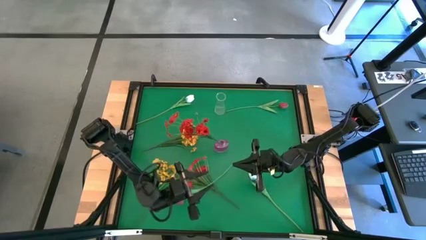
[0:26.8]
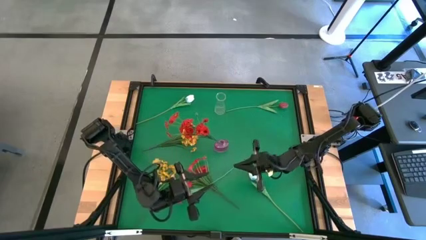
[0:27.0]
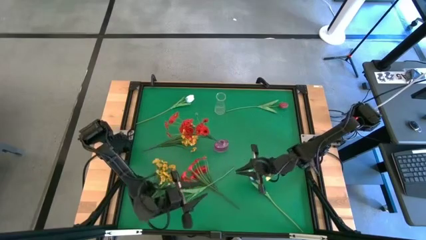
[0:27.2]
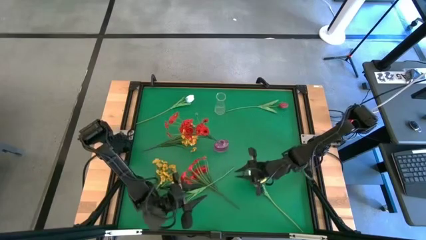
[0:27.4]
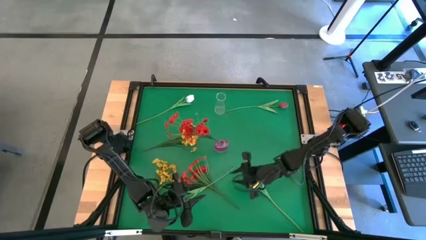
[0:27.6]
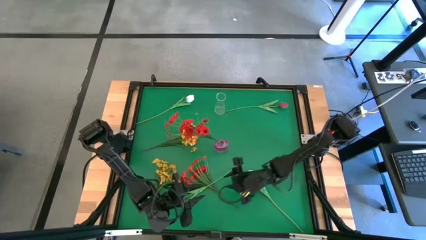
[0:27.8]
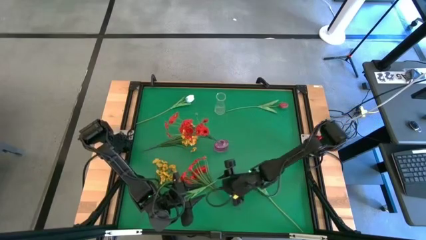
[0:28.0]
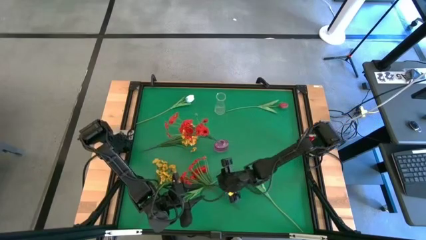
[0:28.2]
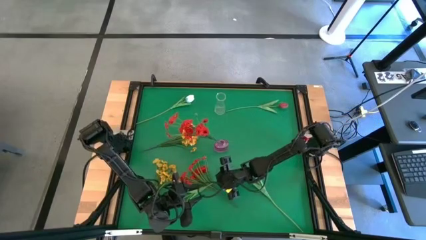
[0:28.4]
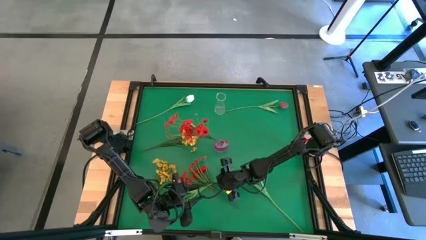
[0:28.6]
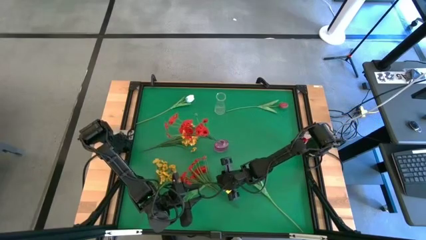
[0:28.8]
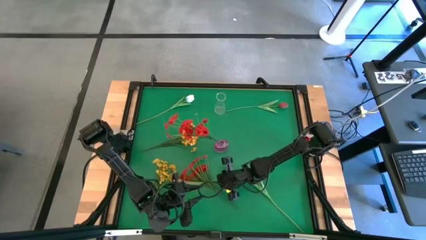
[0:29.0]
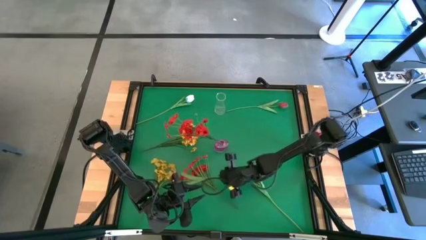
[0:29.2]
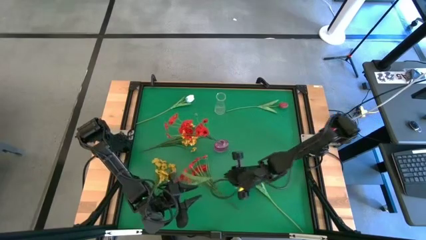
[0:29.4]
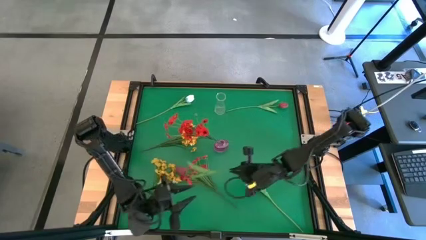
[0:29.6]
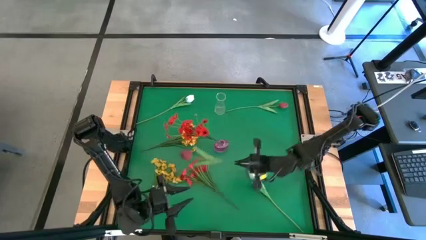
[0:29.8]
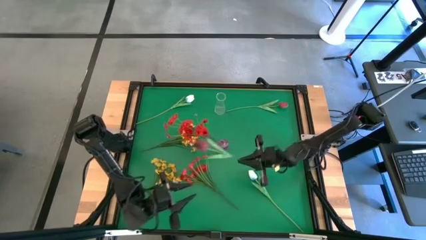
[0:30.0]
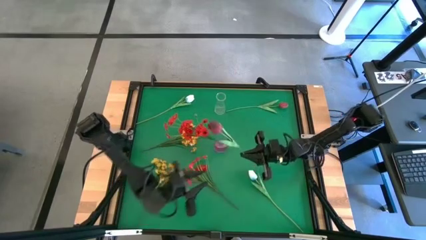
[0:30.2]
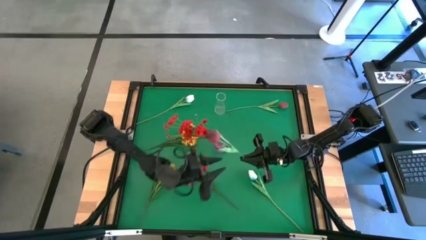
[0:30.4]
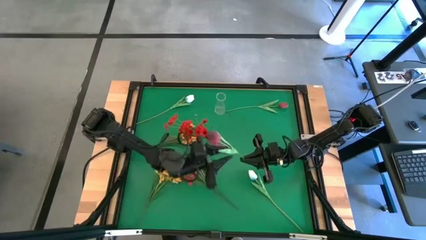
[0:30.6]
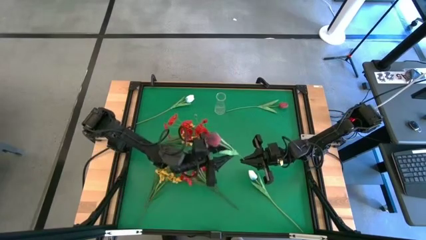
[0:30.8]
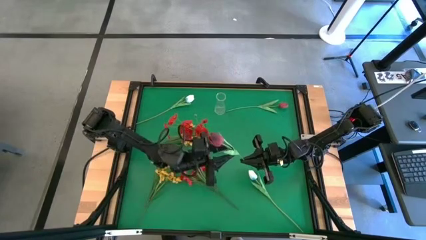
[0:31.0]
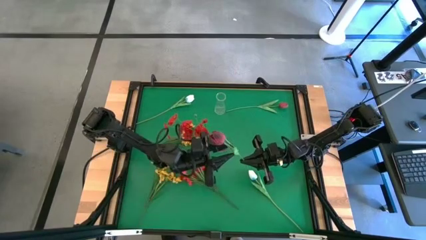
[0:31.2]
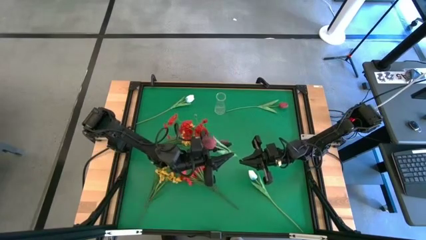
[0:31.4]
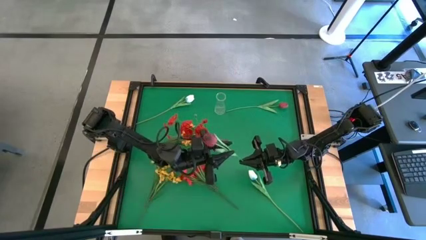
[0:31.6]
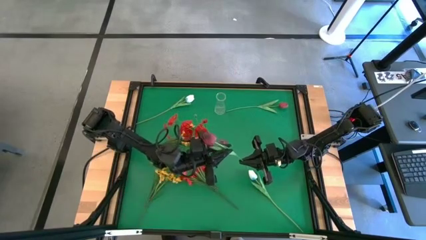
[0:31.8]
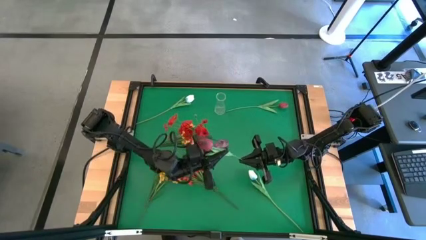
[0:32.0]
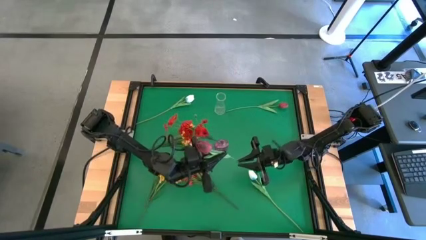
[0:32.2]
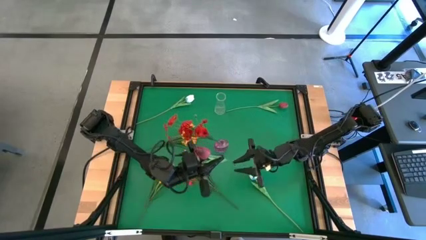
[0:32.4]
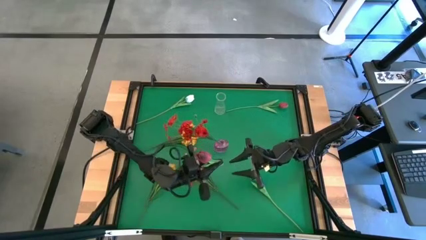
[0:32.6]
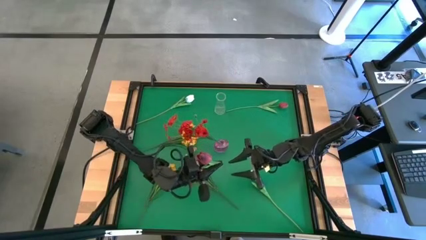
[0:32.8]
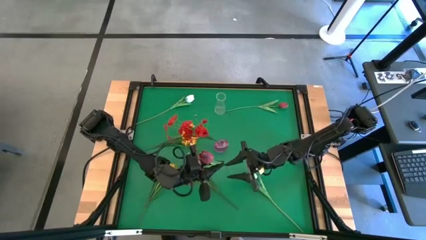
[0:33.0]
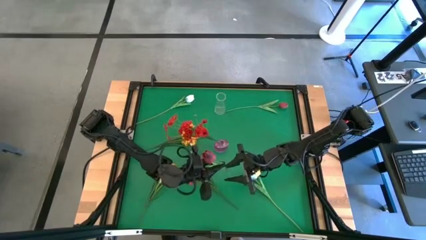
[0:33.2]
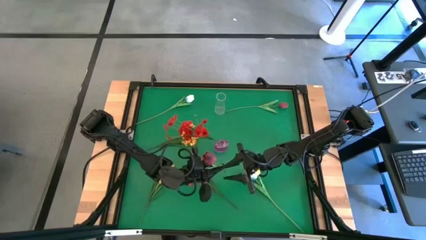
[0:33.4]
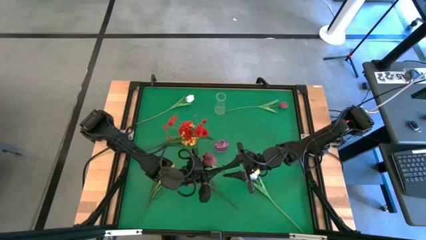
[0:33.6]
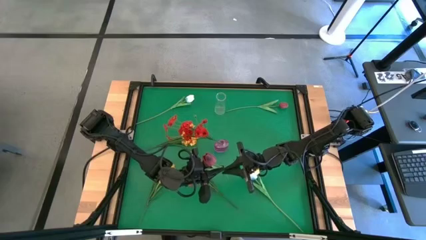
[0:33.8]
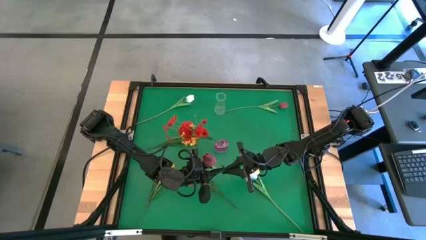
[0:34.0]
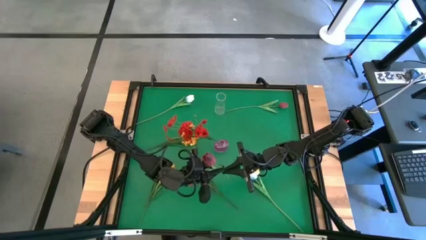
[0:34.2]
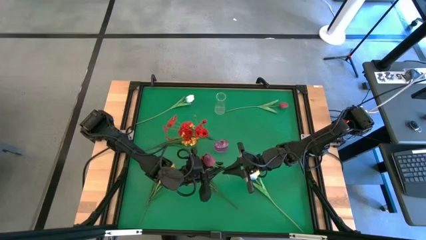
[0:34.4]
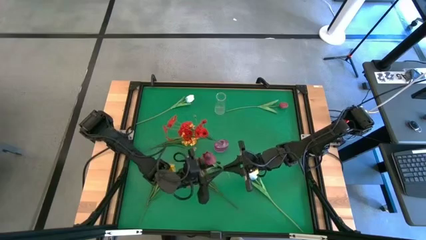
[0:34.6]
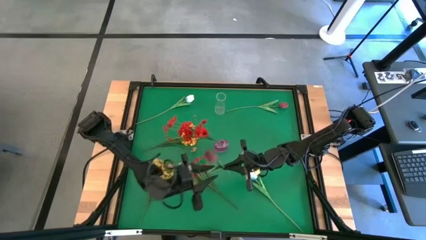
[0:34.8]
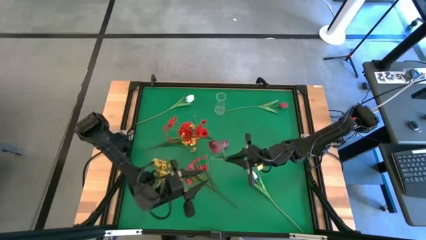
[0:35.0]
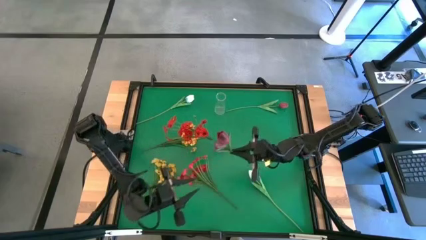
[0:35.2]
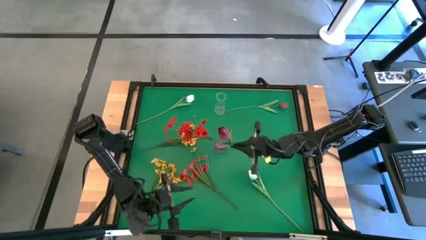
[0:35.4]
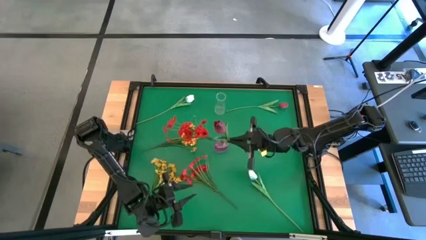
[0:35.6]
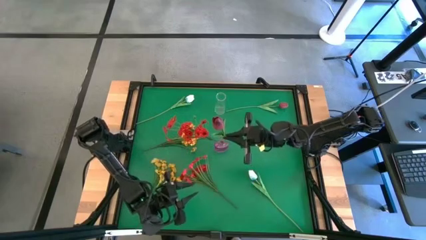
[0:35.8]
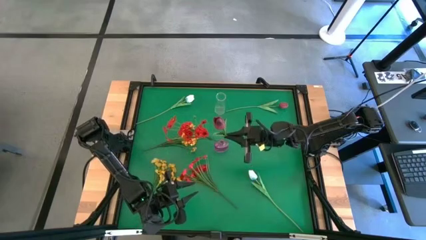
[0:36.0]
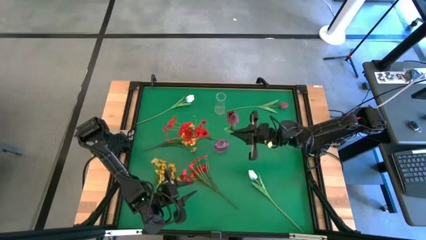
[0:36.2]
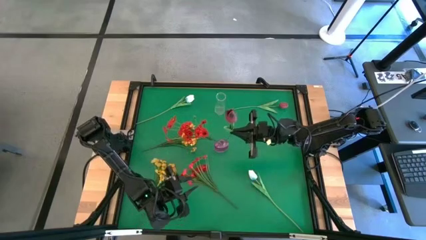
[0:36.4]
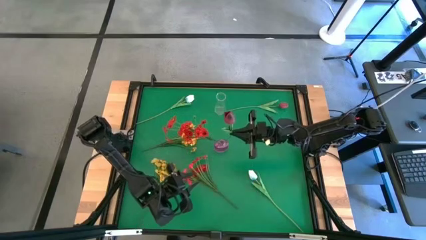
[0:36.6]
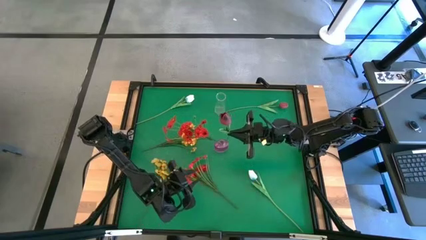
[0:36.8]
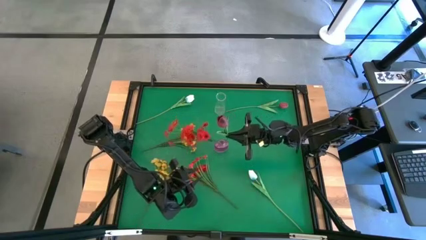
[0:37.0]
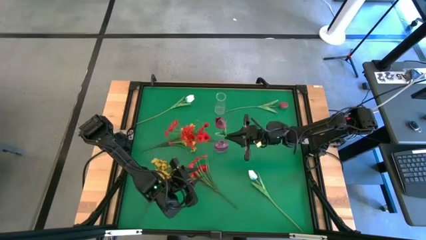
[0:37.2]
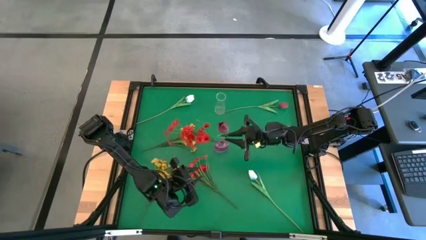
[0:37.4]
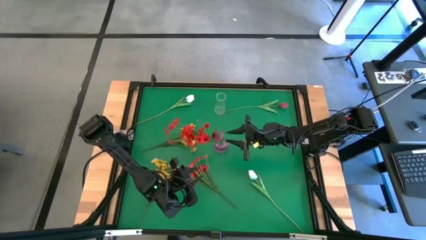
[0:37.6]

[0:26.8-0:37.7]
Task: Sort flowers into vase by color
Put the bottom red flower into the pink vase

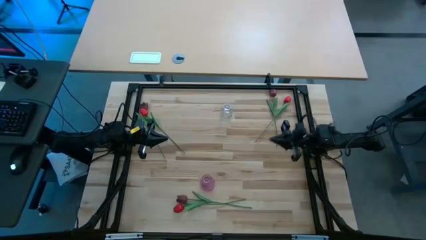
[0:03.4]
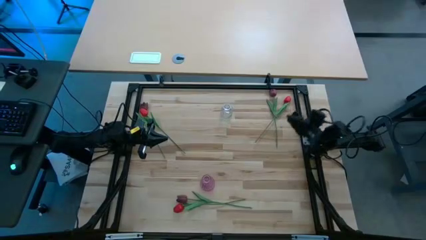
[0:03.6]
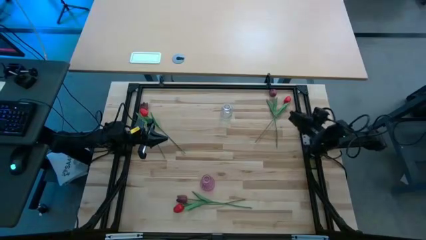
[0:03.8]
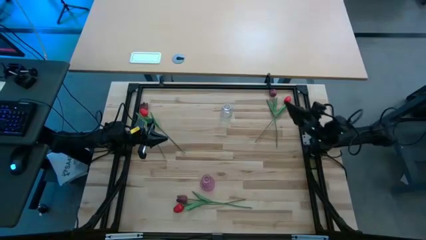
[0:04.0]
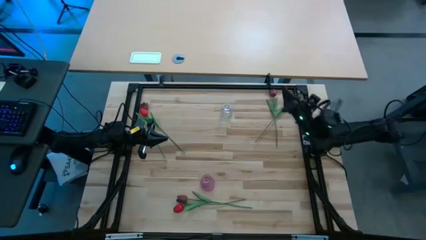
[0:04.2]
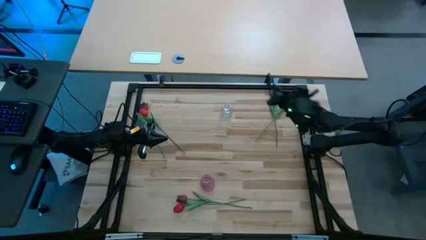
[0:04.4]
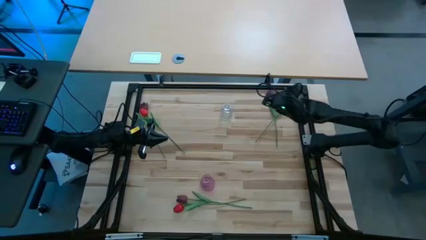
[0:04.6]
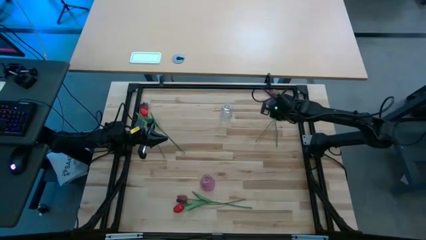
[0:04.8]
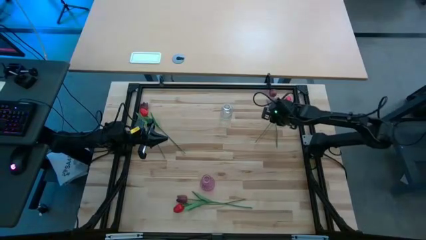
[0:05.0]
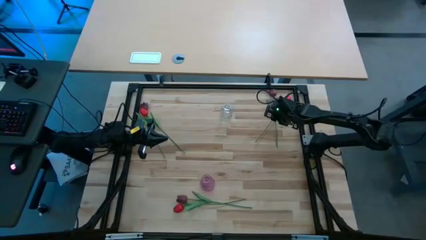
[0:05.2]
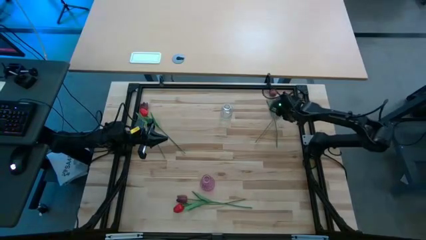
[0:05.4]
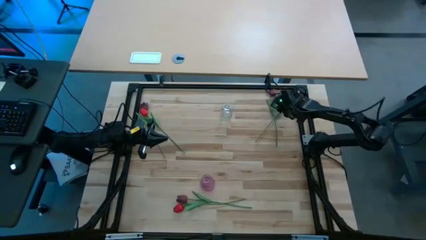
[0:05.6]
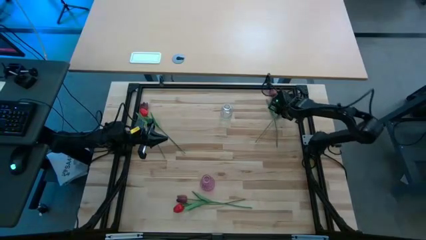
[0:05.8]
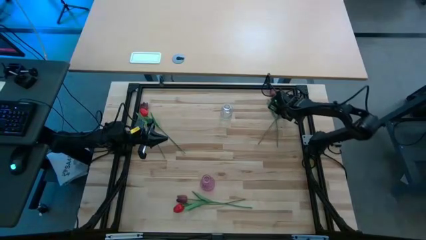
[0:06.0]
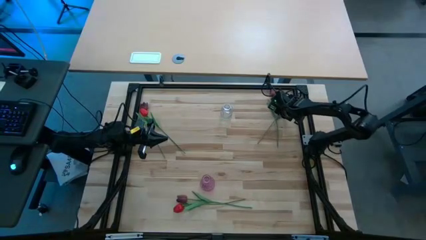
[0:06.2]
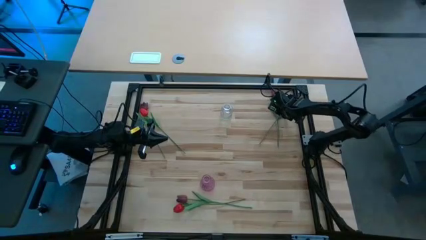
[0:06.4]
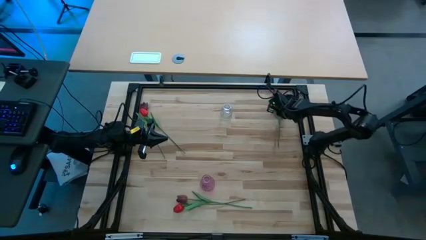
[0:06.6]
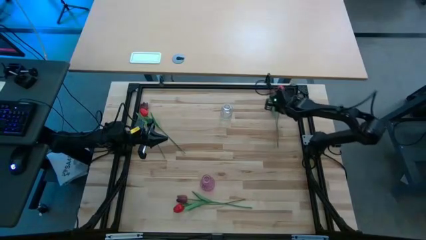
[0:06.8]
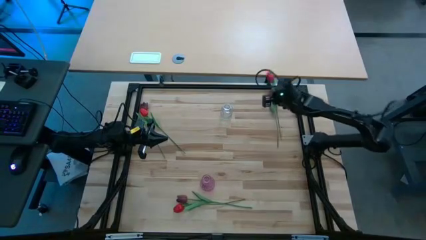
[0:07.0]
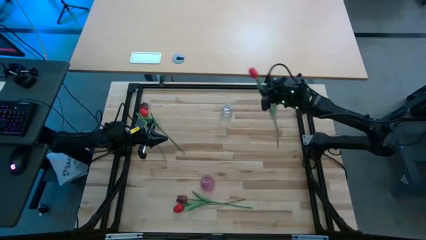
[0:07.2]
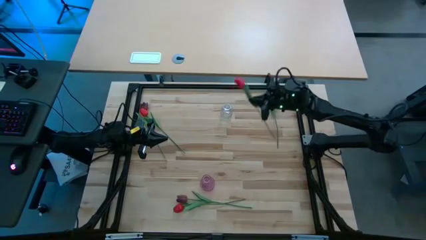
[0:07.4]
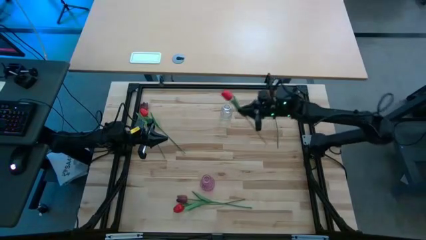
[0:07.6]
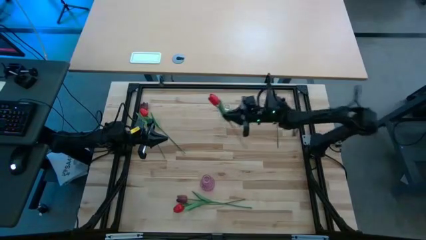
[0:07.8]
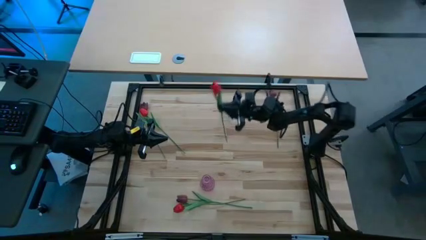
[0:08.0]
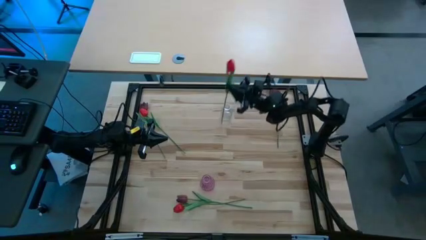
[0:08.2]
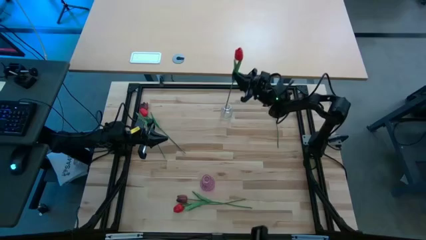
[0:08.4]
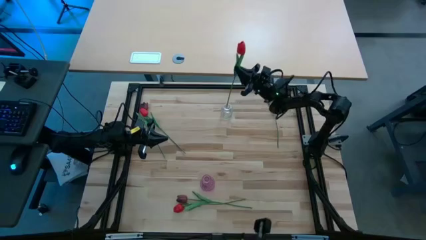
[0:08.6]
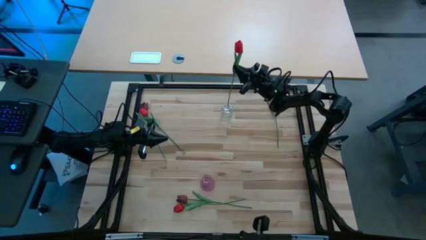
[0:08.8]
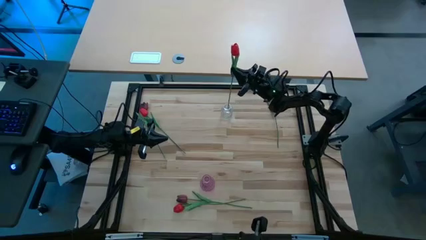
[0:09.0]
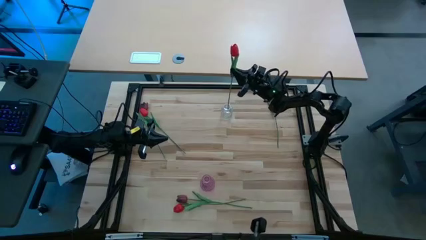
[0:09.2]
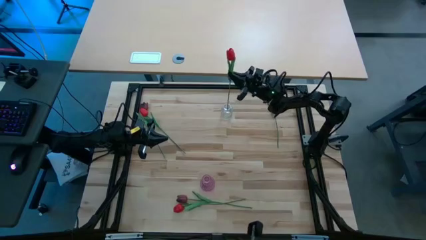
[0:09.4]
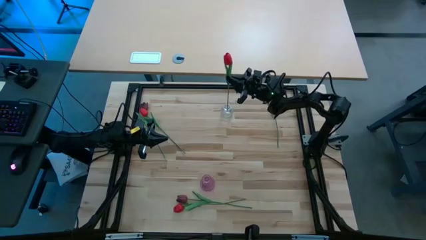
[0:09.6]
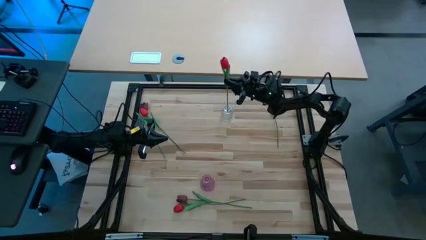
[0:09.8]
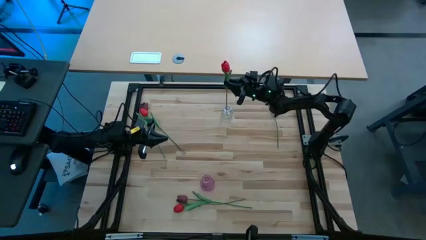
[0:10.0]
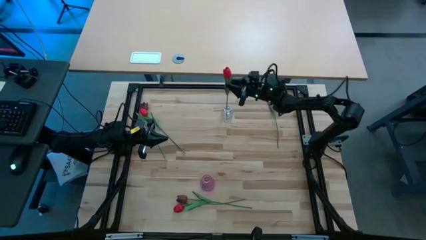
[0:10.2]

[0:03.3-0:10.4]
Task: Sort flowers into vase by color
Put the top right red tulip into the transparent flower vase
